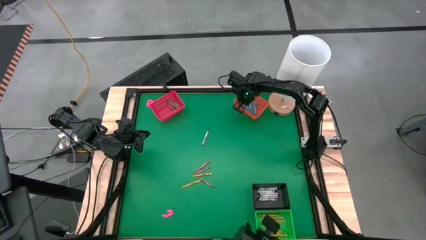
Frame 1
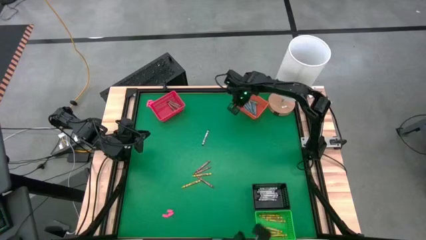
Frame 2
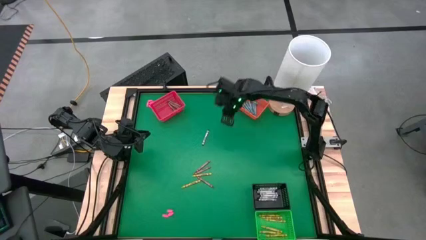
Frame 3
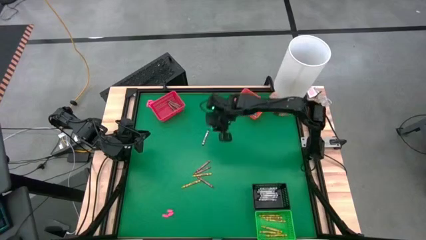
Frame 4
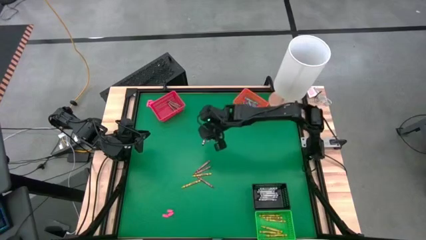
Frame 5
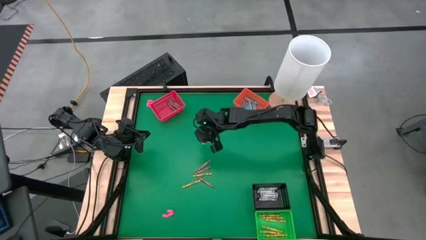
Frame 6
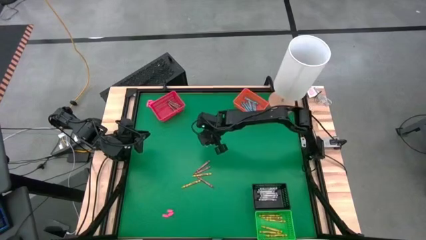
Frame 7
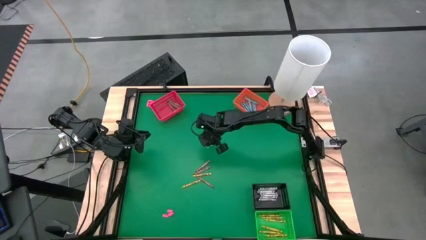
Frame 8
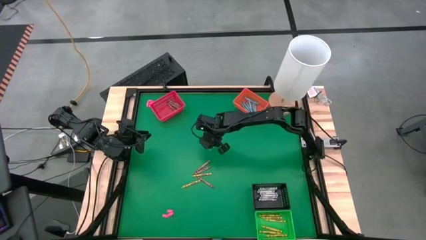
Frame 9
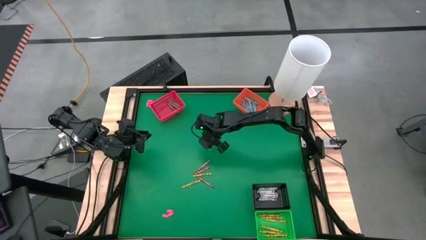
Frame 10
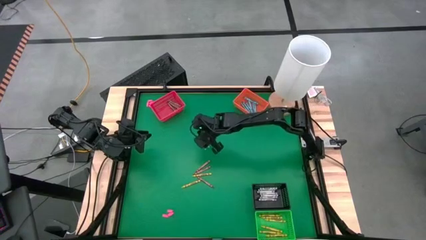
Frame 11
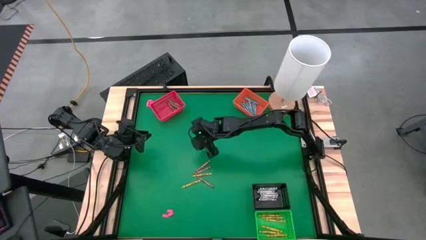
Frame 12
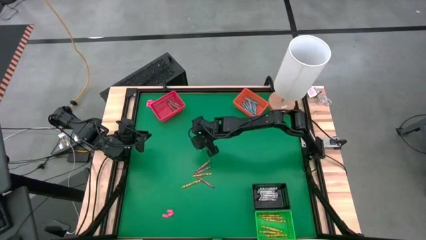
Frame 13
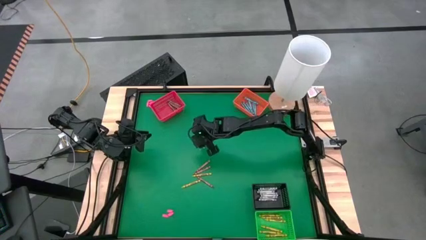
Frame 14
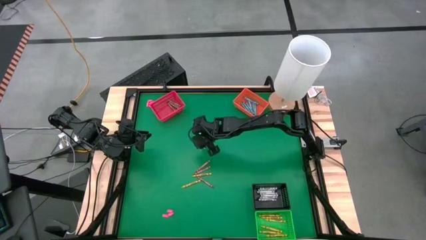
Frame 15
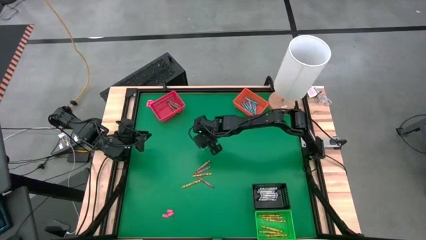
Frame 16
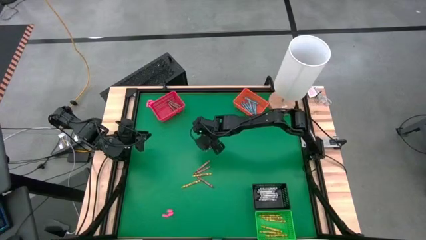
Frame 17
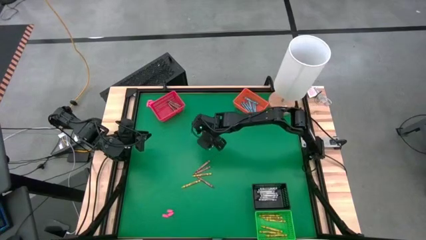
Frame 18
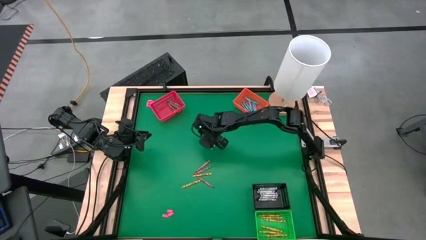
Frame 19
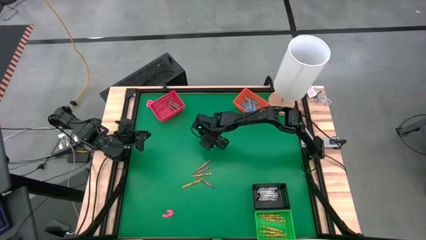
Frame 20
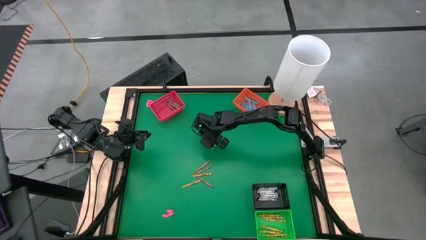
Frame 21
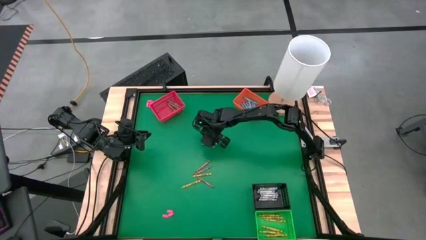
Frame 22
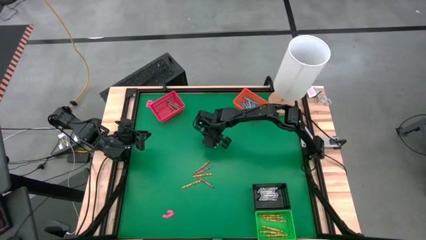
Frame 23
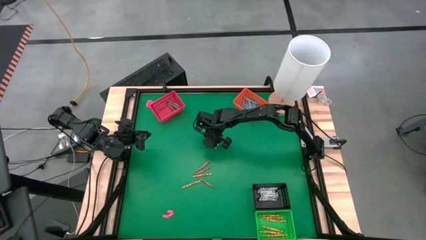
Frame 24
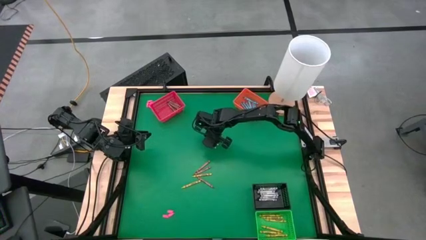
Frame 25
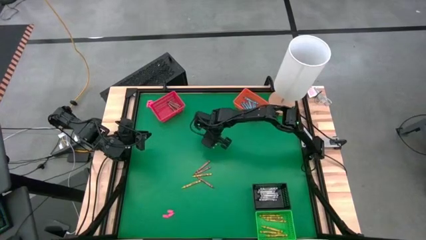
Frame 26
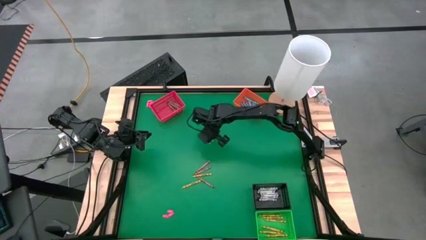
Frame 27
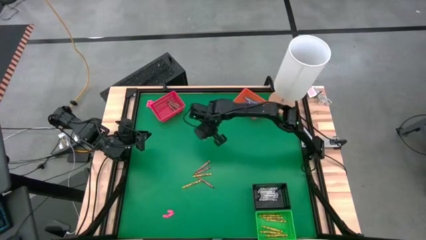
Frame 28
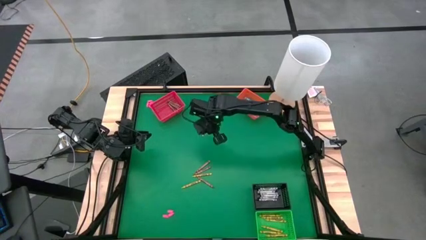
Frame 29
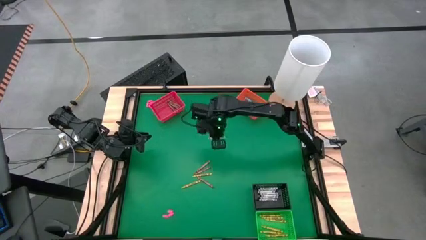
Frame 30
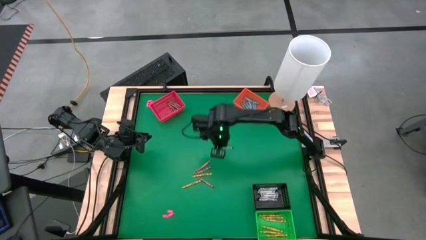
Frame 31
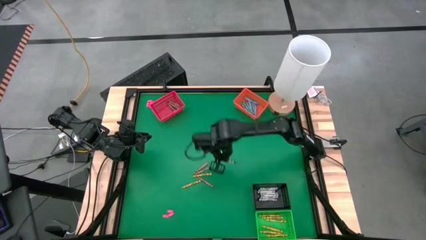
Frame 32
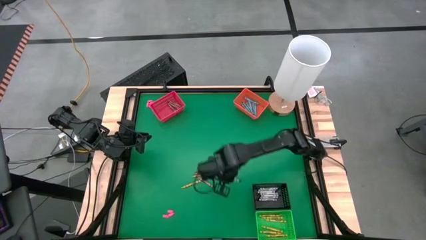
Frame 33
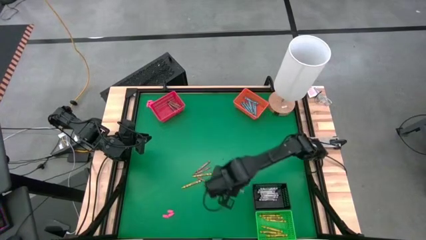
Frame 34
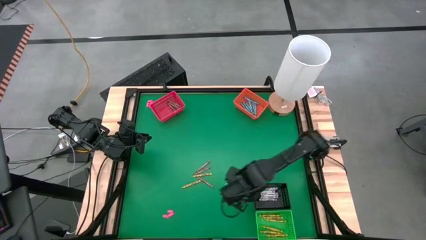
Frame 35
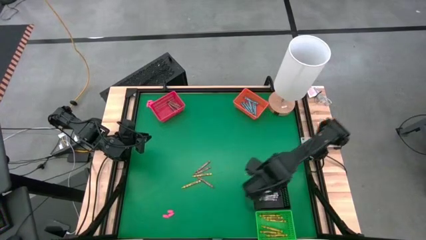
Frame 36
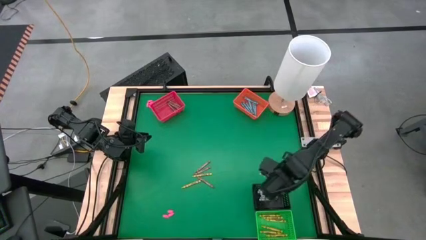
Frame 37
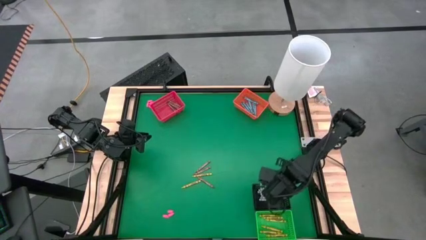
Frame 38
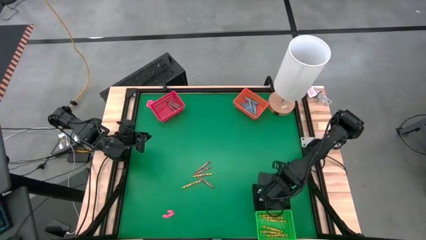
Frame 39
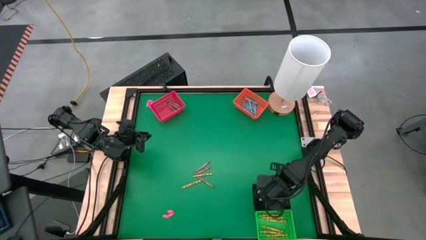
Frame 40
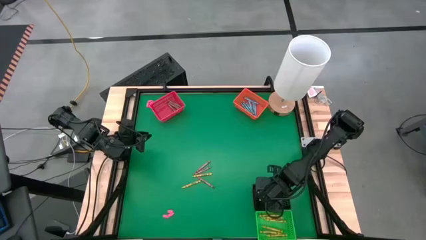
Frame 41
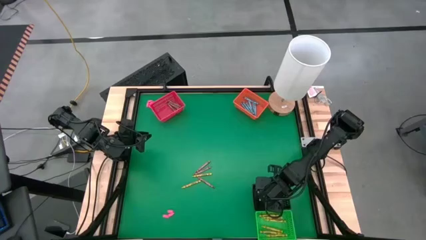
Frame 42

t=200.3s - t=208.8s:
Task: Sort crayons
Put the black crayon into the black bin

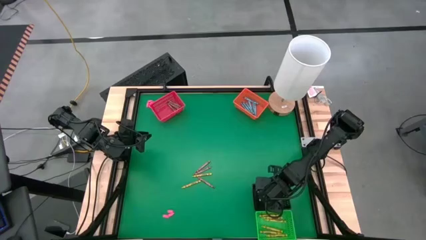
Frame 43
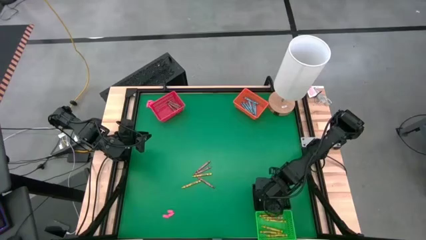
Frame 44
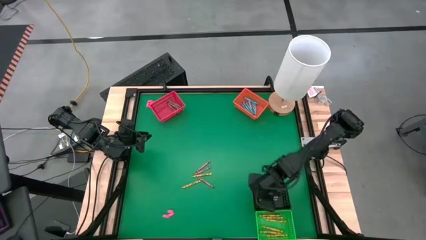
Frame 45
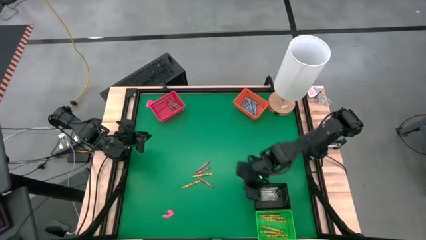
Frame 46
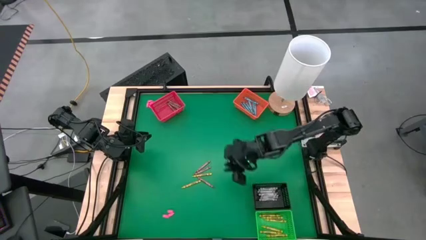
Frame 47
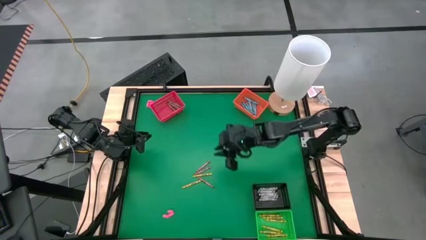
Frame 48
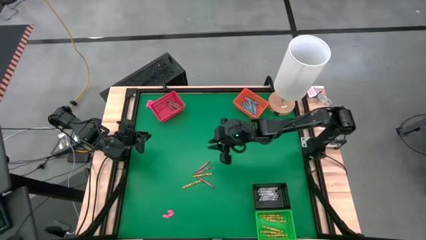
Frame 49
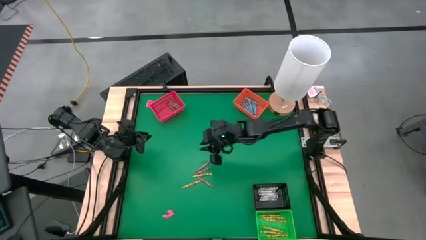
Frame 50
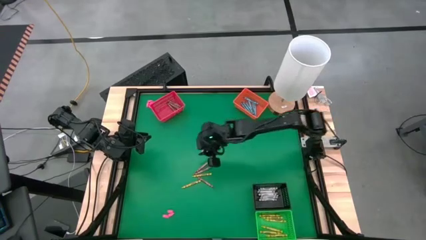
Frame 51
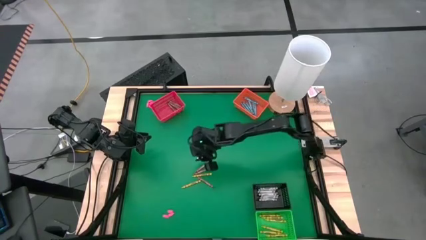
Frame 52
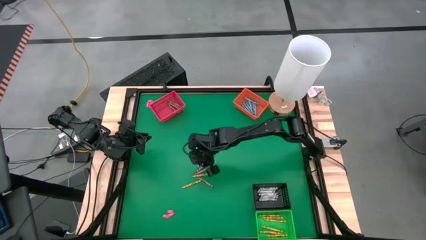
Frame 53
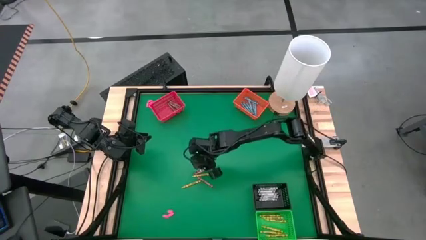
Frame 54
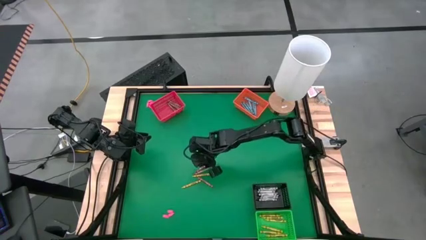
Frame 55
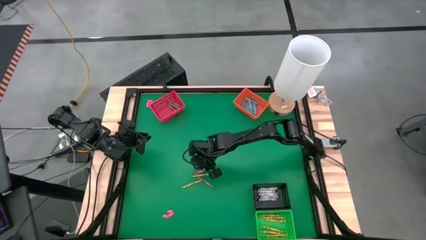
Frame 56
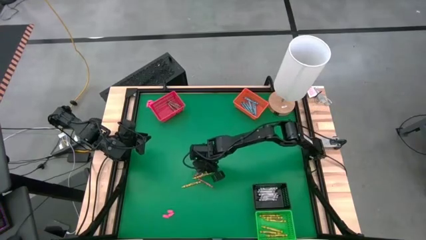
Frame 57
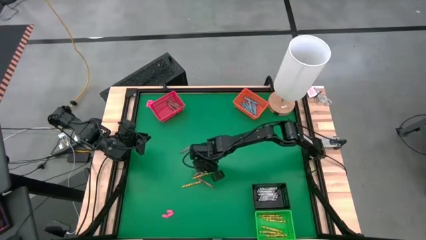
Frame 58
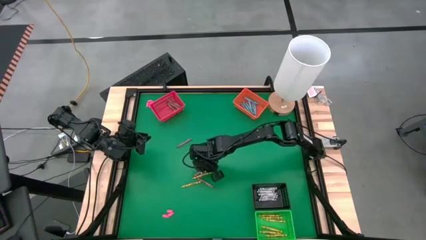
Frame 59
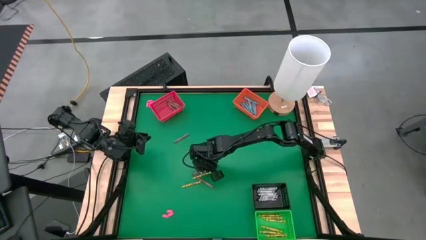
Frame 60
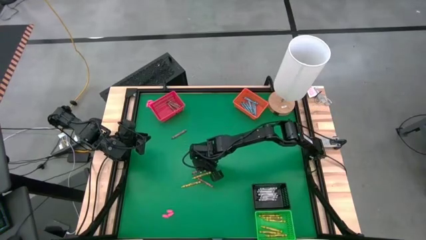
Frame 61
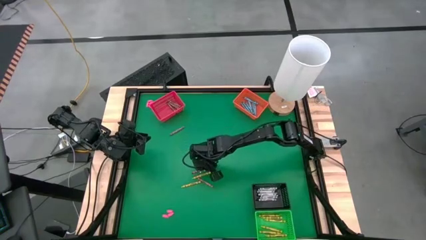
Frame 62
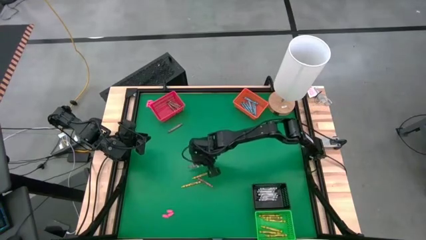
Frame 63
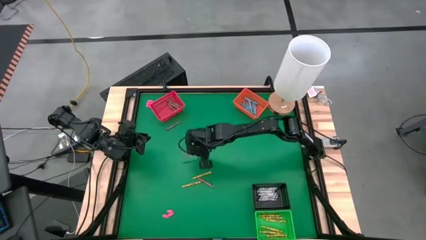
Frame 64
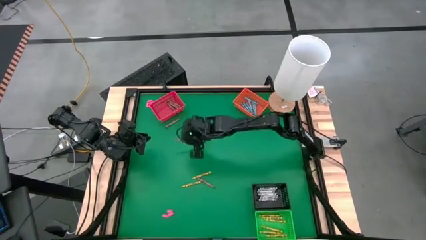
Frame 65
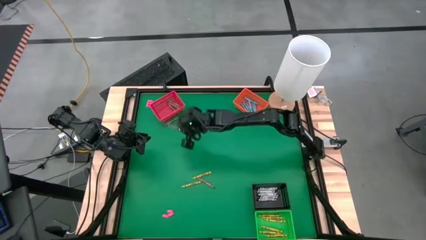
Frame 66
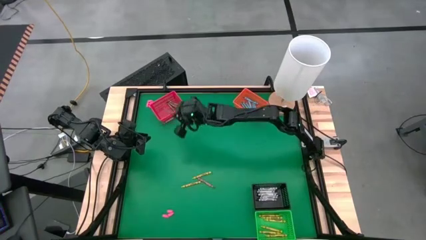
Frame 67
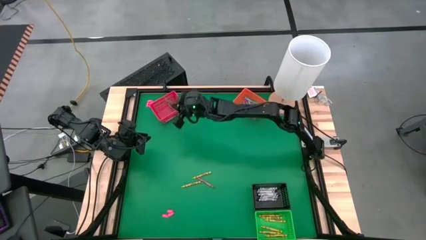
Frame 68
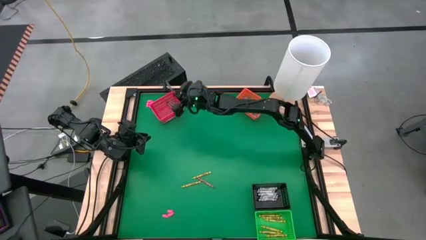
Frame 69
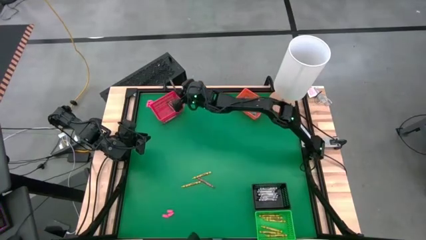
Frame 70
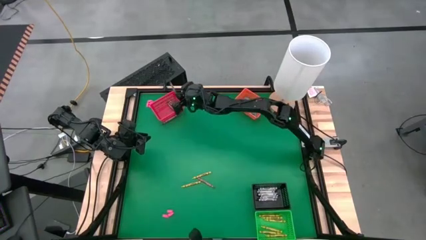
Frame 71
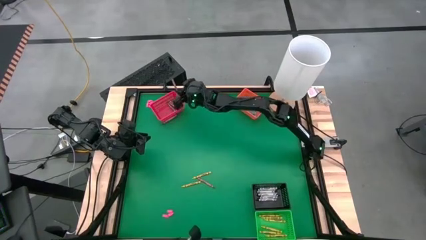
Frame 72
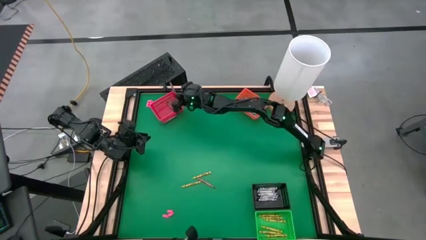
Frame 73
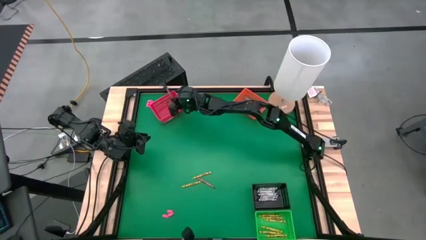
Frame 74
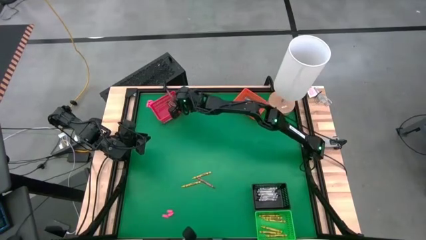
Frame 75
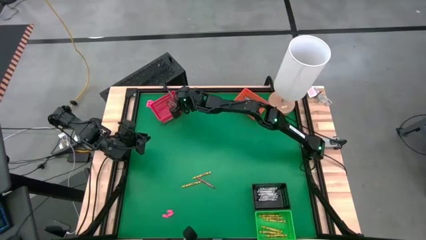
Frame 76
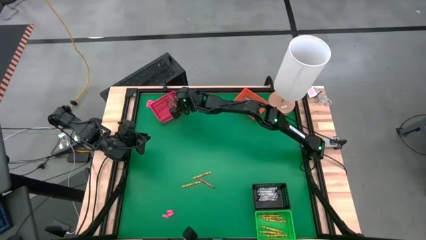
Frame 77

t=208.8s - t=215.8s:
Put the brown crayon into the red bin
